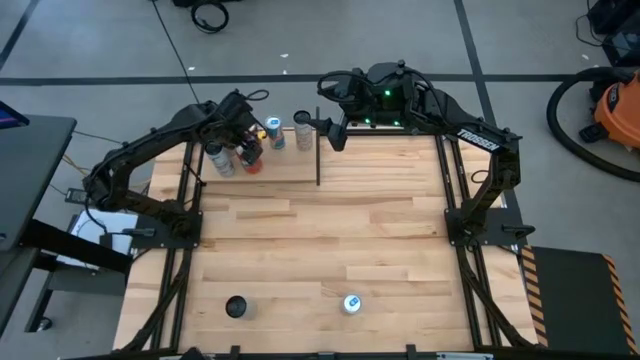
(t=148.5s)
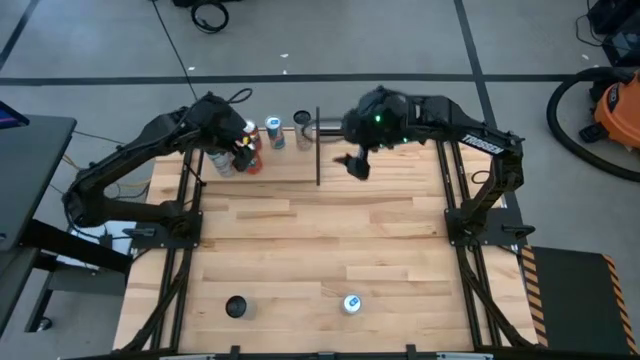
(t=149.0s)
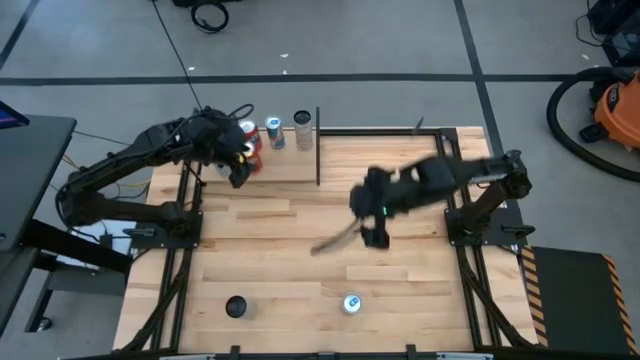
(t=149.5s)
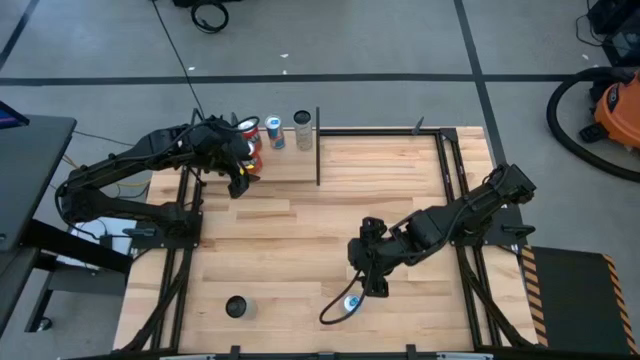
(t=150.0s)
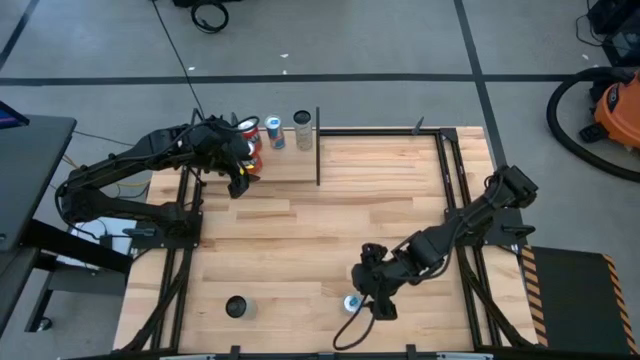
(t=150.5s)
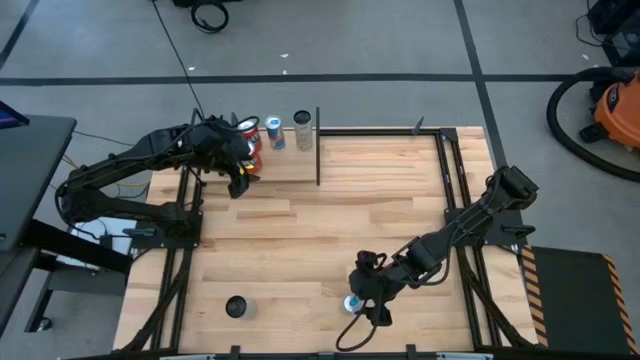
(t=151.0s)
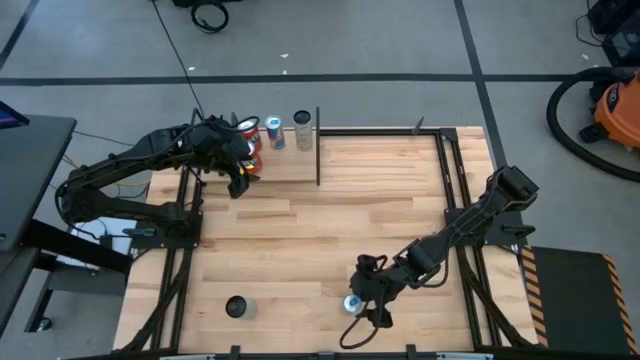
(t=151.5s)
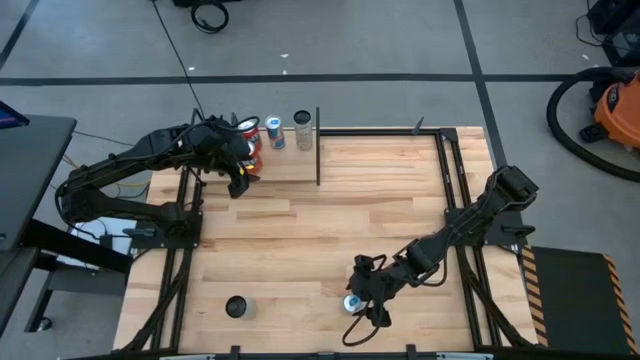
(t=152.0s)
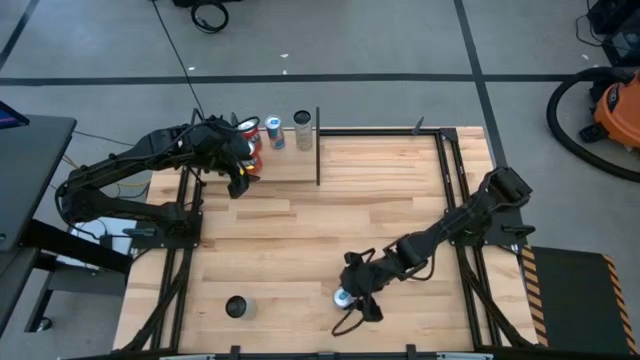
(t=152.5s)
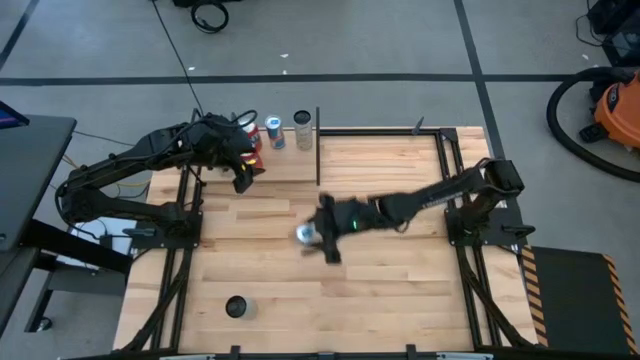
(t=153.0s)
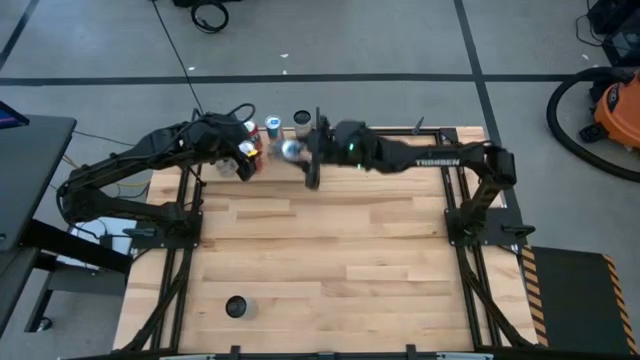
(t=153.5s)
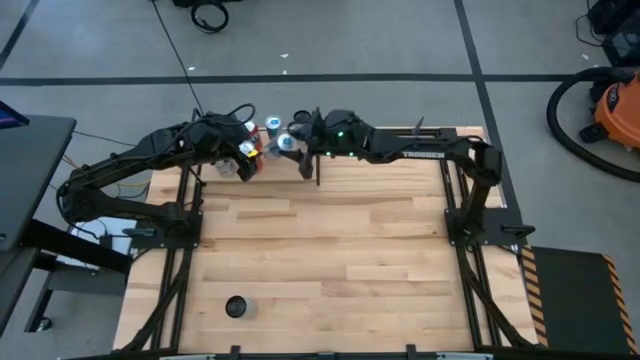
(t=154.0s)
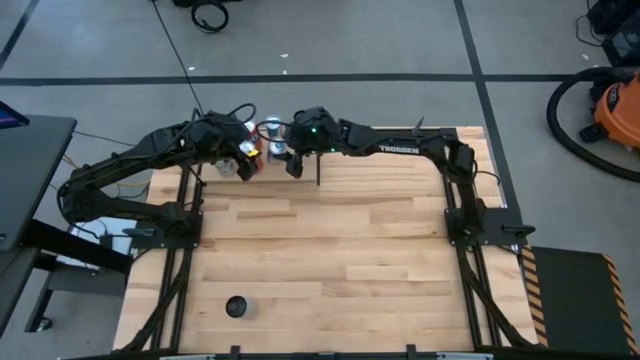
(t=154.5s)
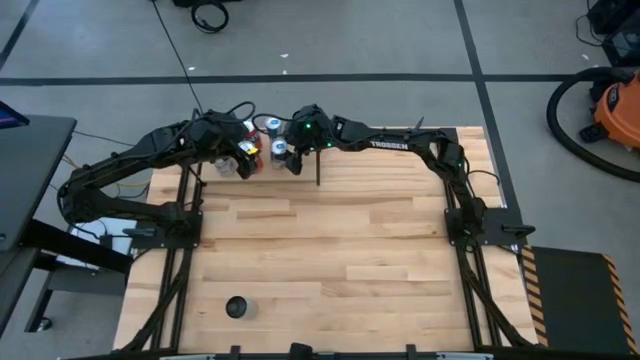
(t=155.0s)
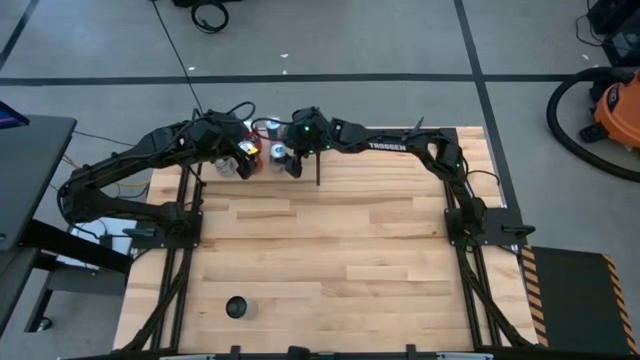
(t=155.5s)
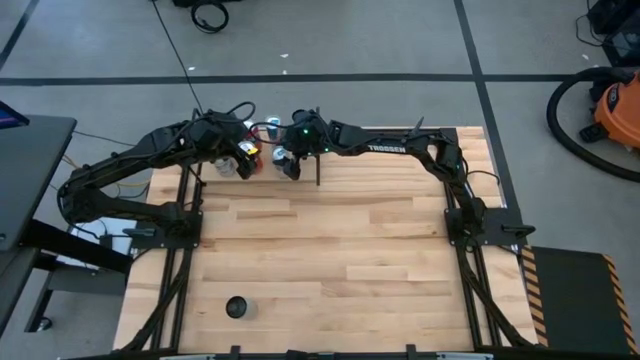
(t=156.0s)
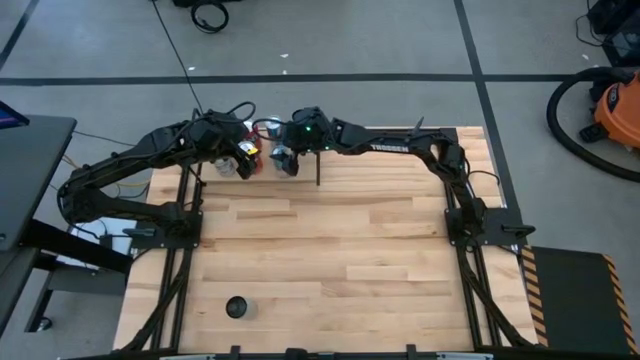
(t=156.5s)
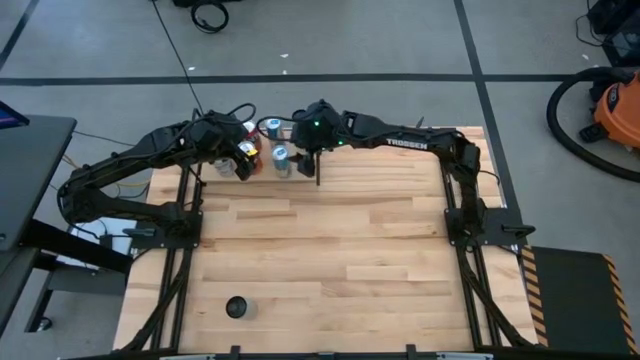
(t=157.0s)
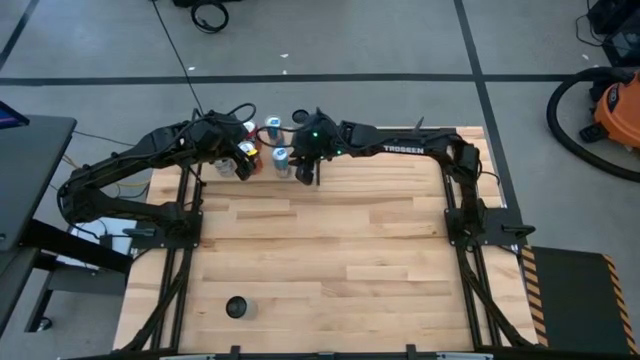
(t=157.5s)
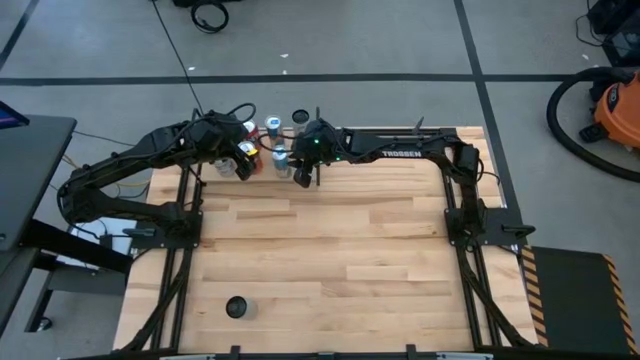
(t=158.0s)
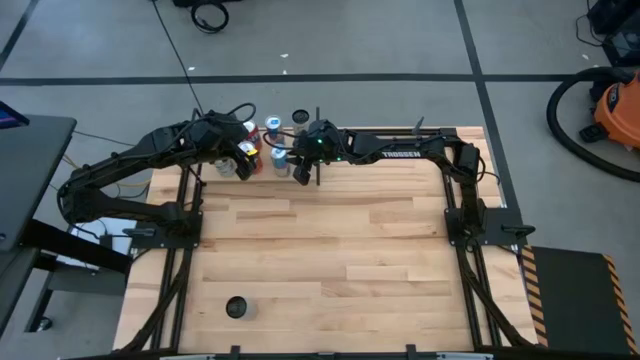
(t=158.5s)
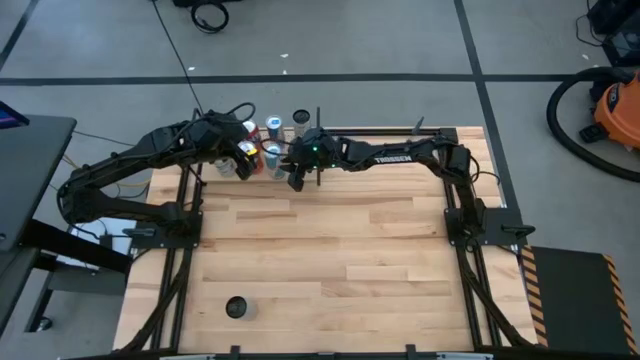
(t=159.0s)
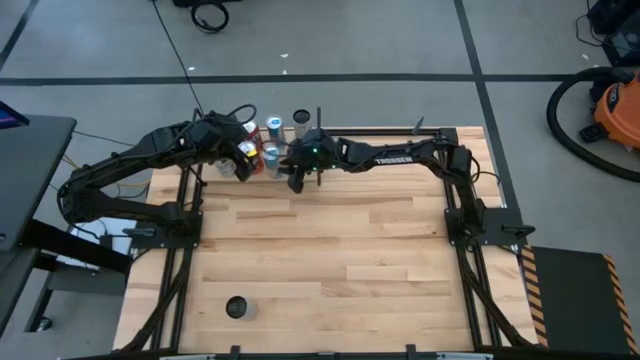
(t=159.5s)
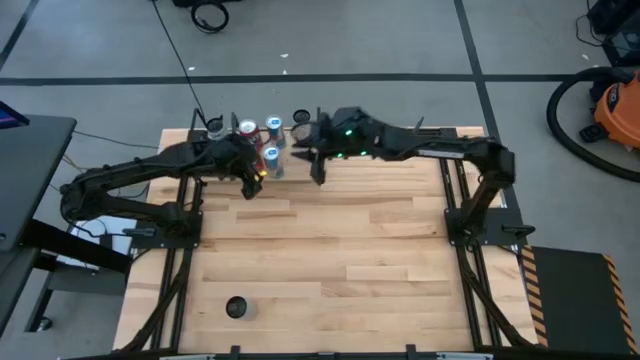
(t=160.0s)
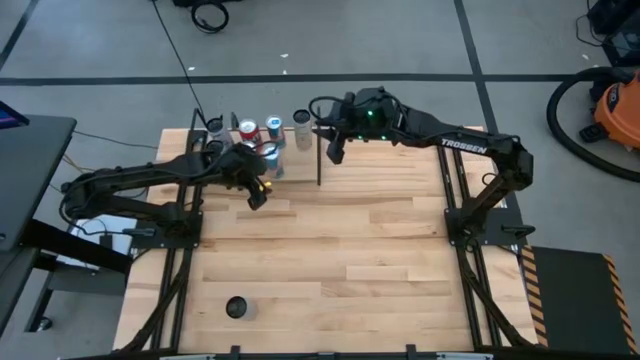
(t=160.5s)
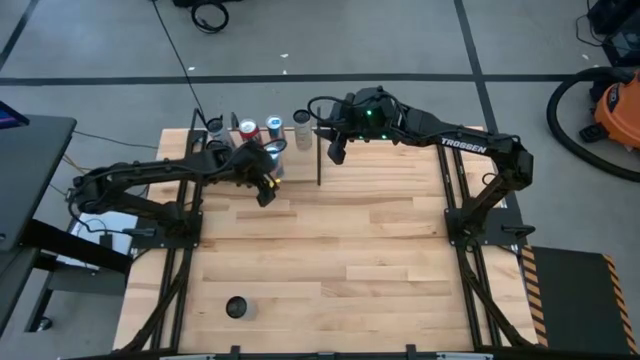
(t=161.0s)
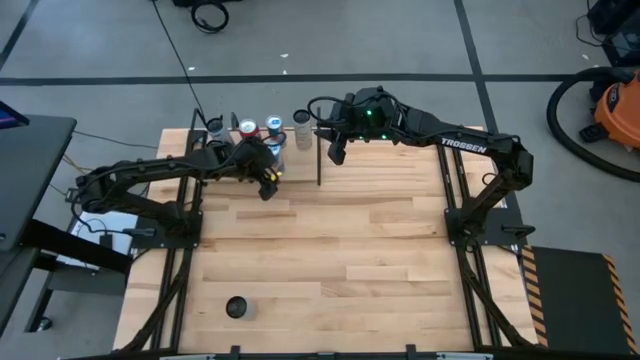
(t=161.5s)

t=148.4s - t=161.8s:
Task: Place canned beverage on shelf
Put the blue soda can aligned with the other blue soda can on the shelf

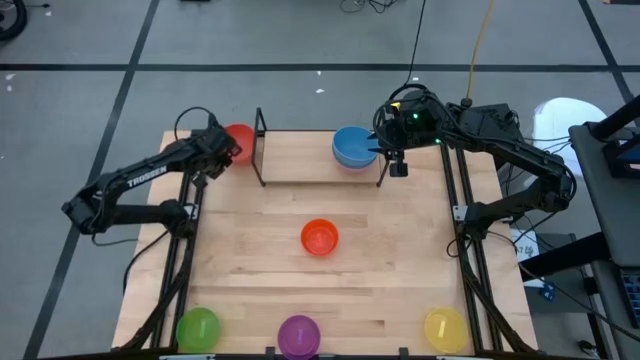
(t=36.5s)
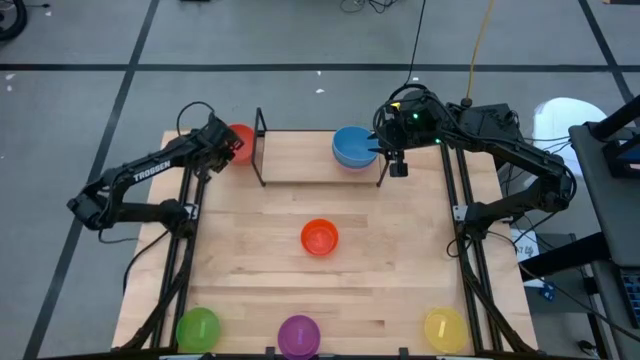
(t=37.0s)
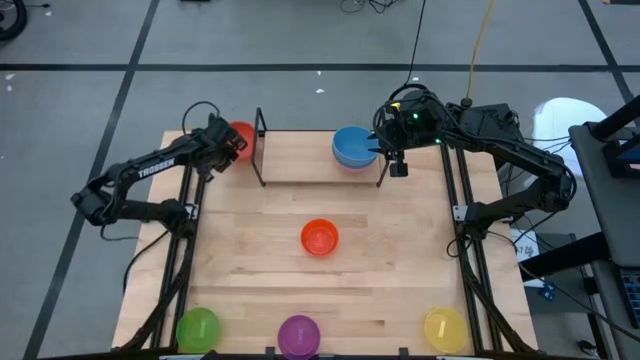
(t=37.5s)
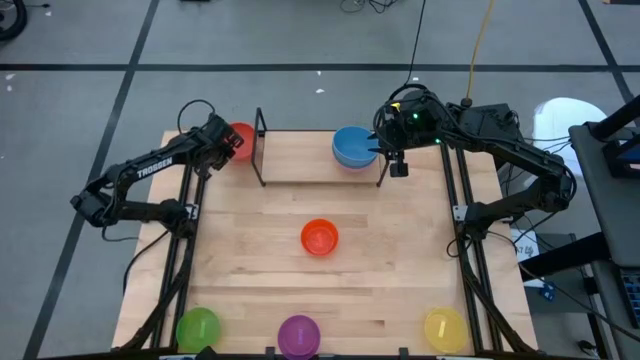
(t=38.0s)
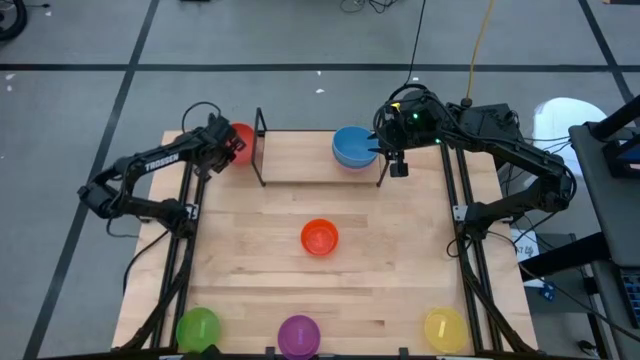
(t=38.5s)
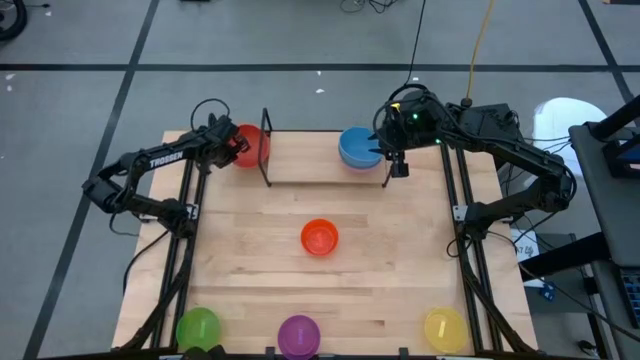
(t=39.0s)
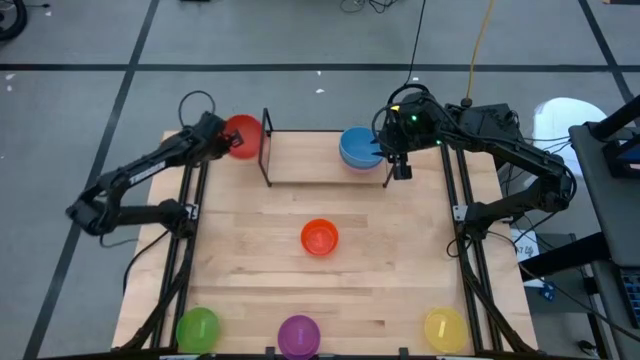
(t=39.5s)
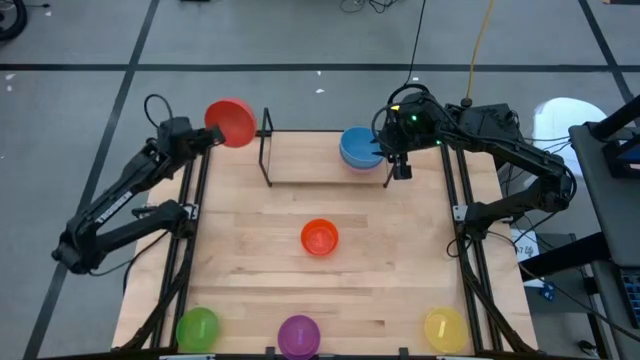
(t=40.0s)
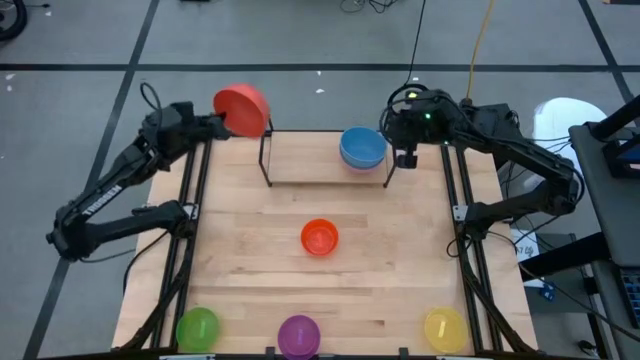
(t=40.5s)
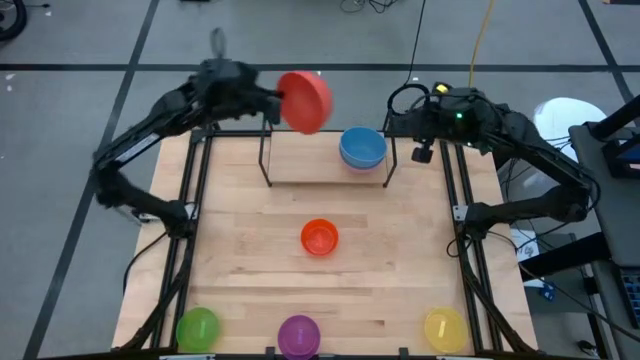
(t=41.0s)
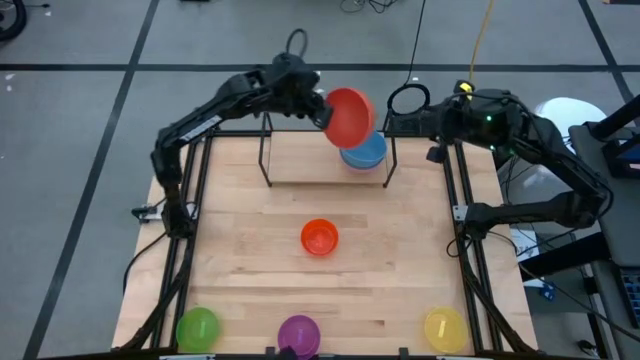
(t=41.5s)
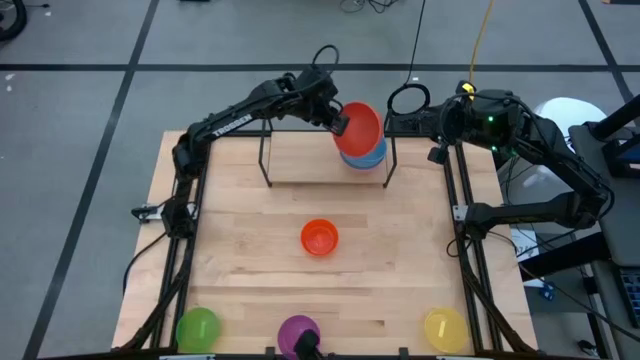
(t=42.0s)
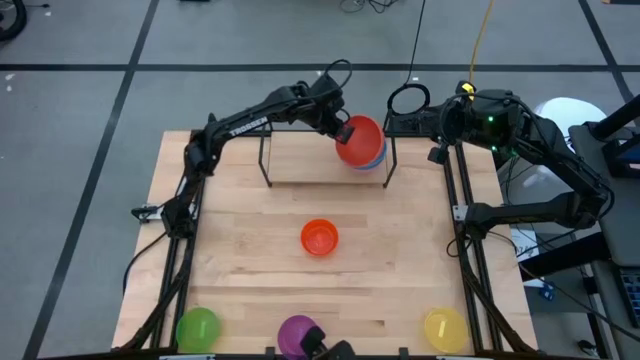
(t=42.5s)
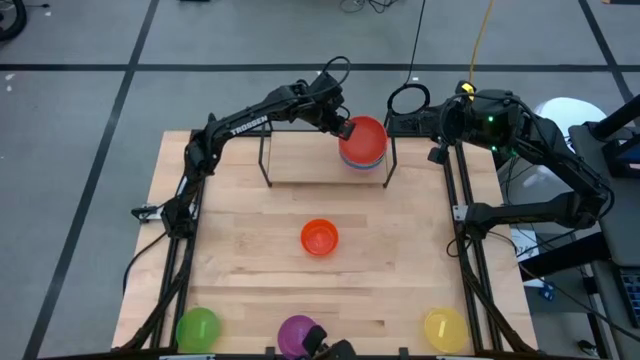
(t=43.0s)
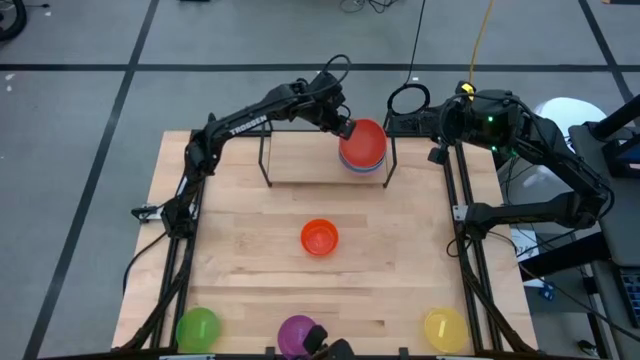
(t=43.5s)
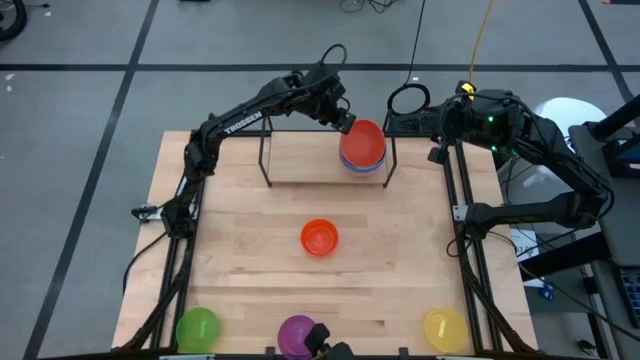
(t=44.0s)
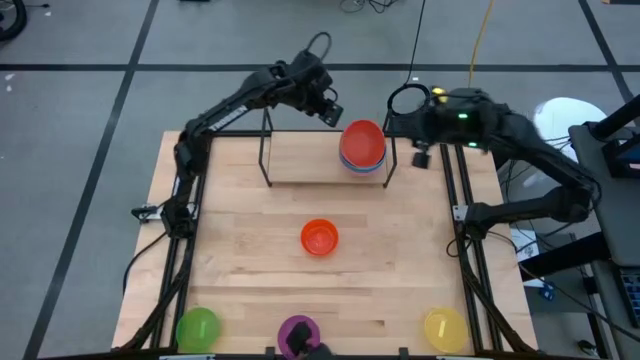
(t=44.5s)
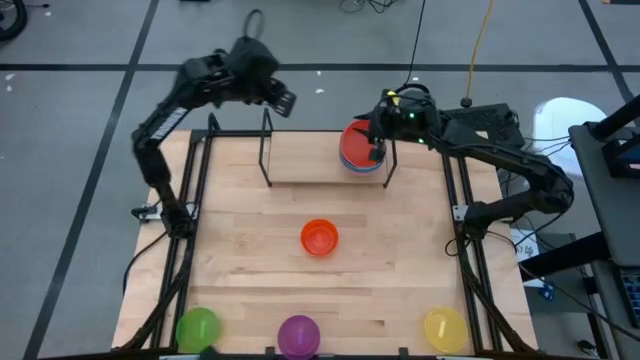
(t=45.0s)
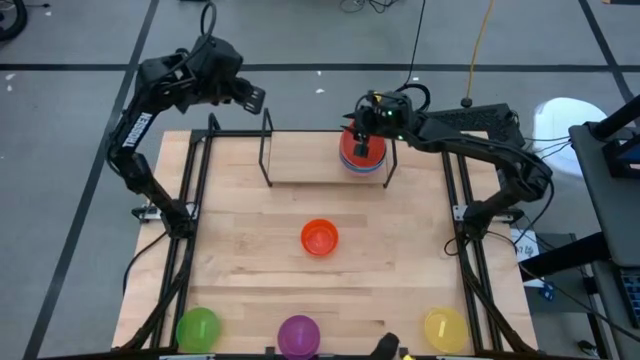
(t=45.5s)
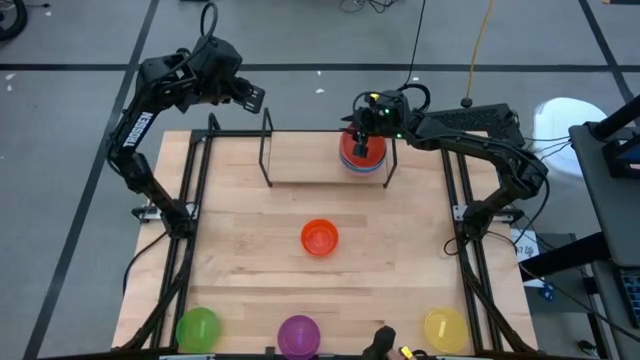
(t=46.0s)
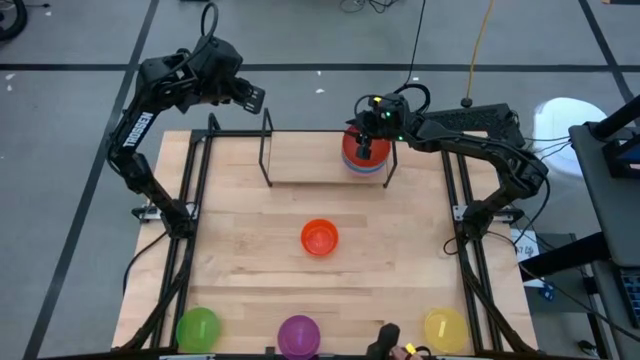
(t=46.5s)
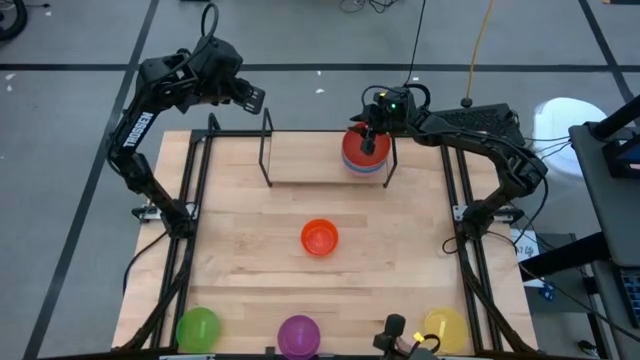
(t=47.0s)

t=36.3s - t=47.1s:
Task: Place and stack bowls onto a shelf
Stack the large orange bowl on top of the blue bowls on the shelf
